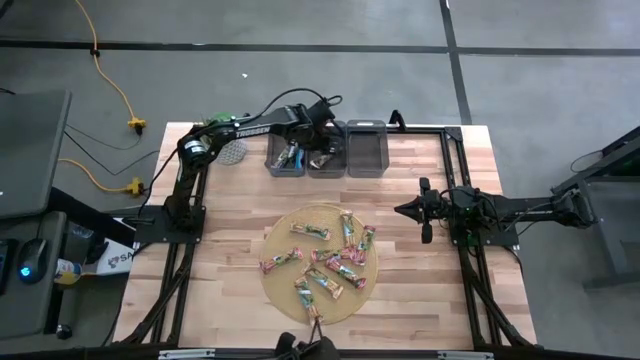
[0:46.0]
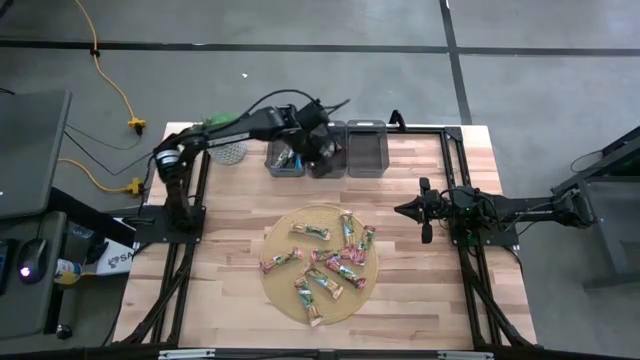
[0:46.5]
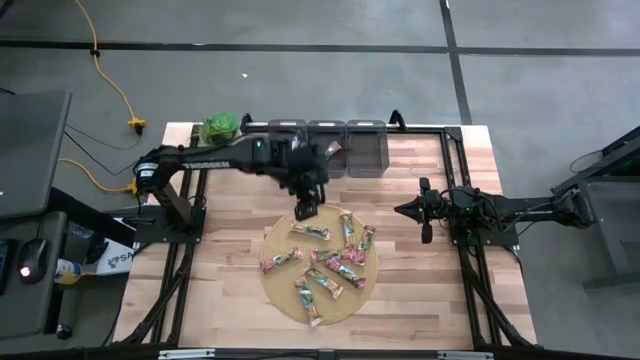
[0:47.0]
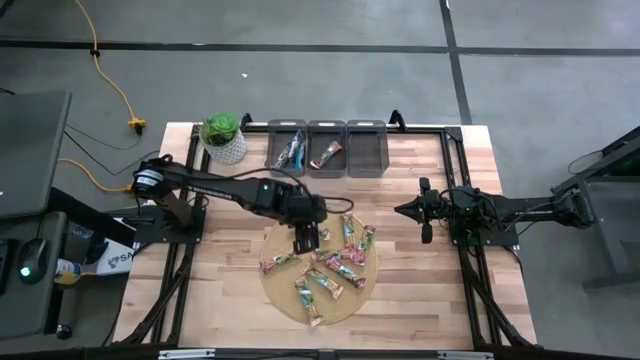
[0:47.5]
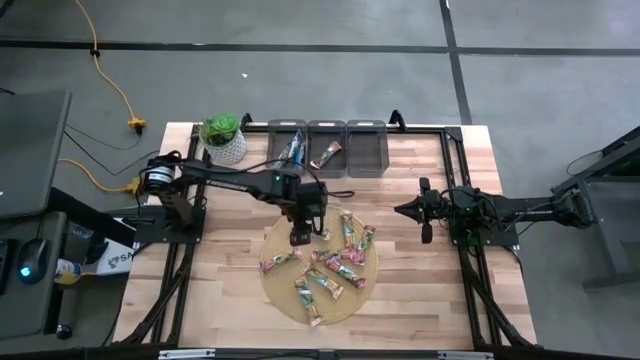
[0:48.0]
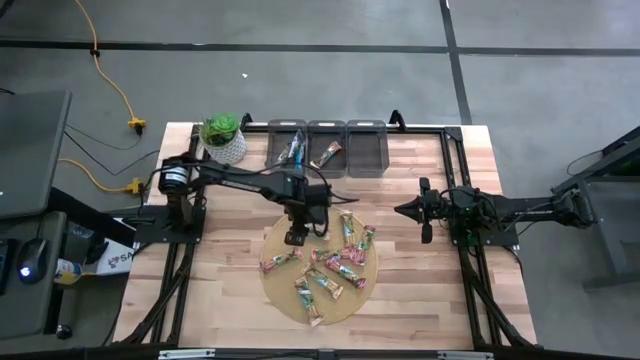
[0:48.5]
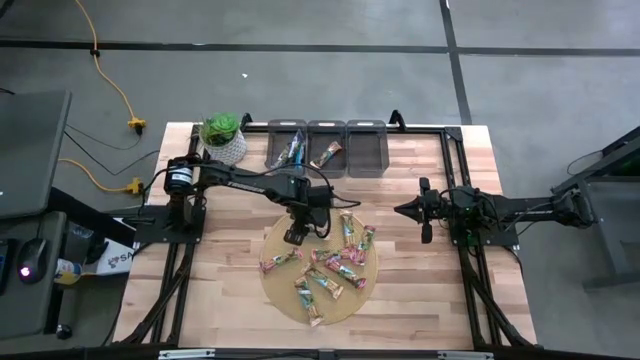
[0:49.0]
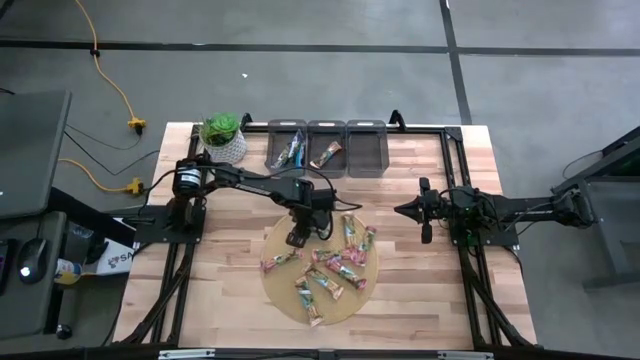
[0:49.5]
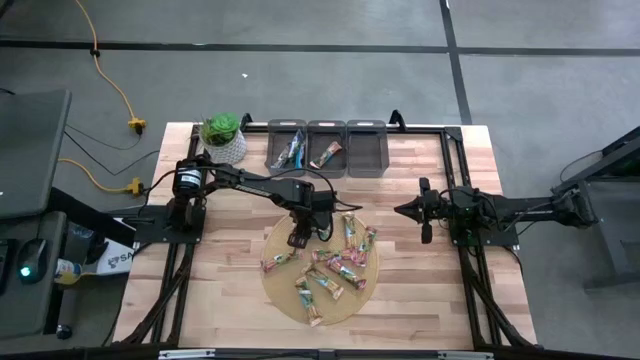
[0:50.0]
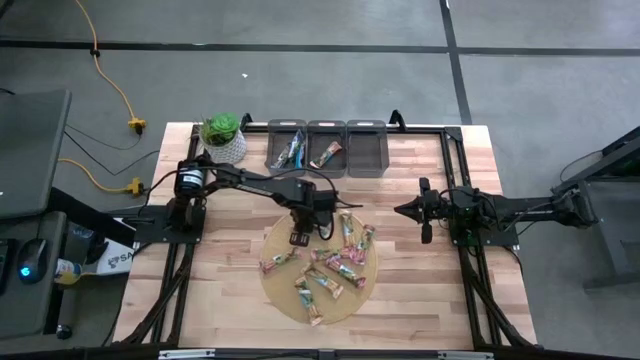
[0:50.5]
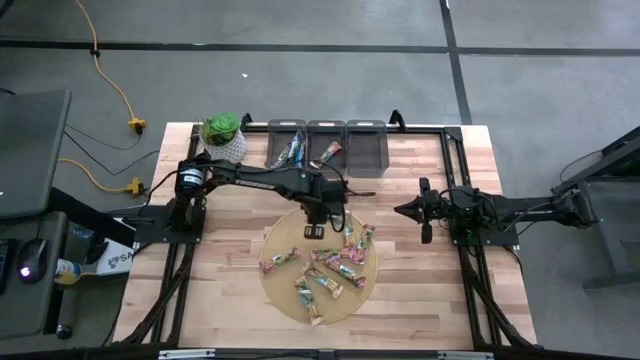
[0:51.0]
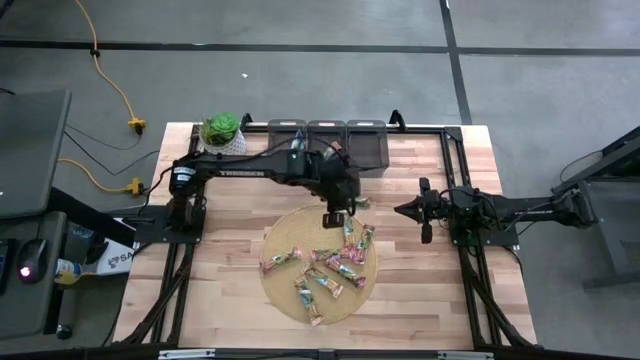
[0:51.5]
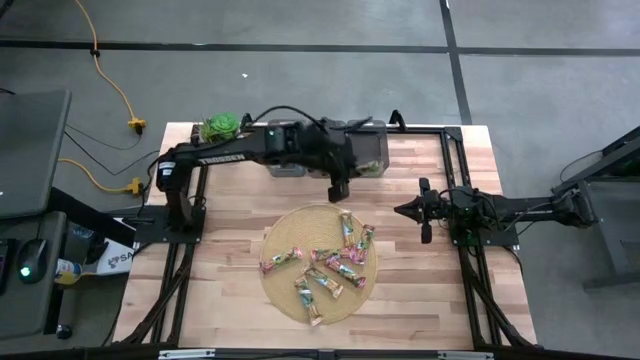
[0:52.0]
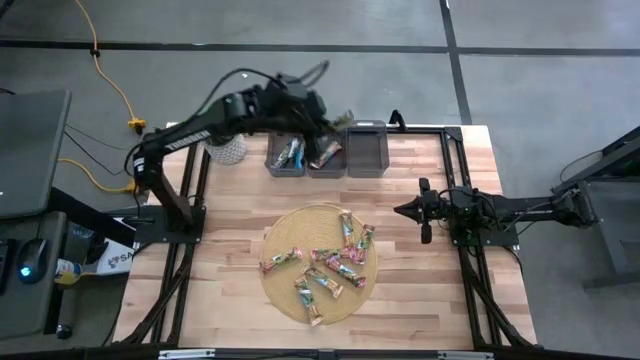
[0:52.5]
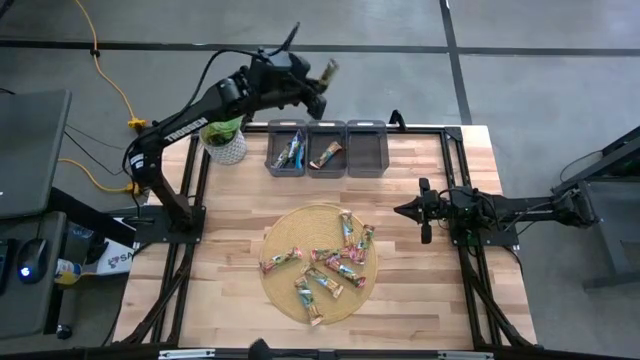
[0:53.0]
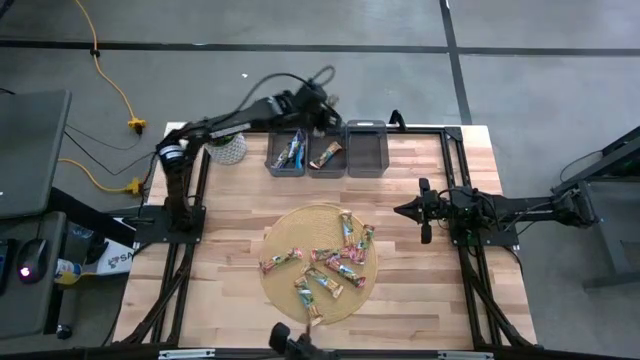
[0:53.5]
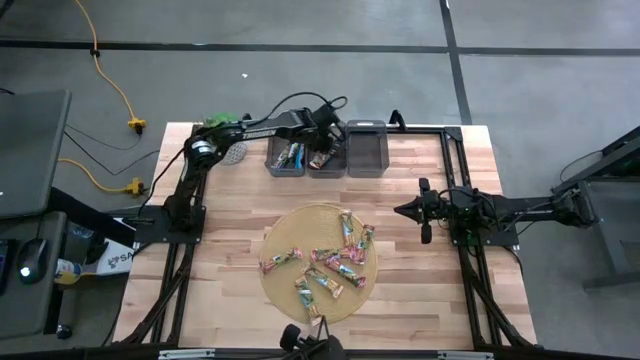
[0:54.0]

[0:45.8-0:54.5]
Task: Pick and place Granola Bars by type
Put the yellow granola bar into the middle black bin

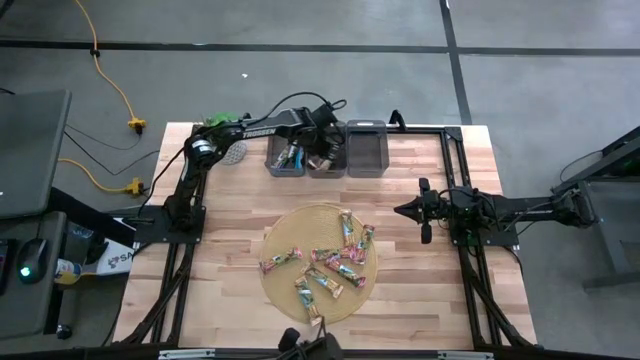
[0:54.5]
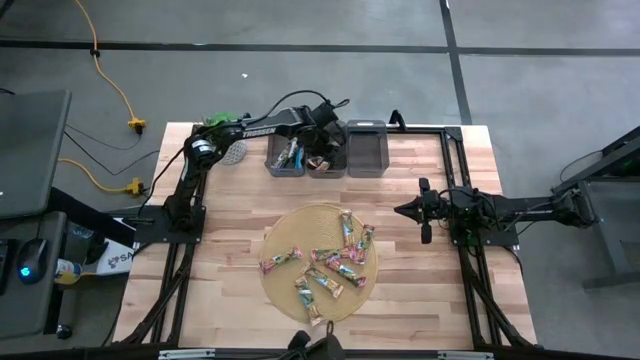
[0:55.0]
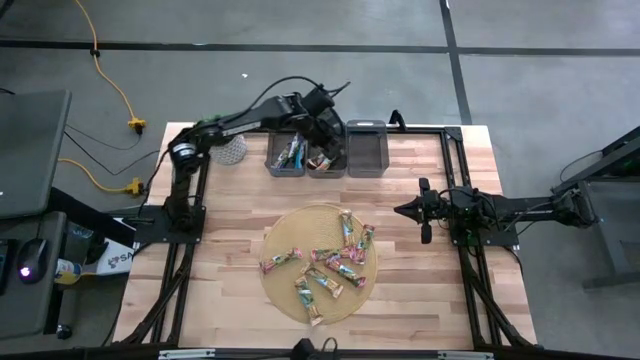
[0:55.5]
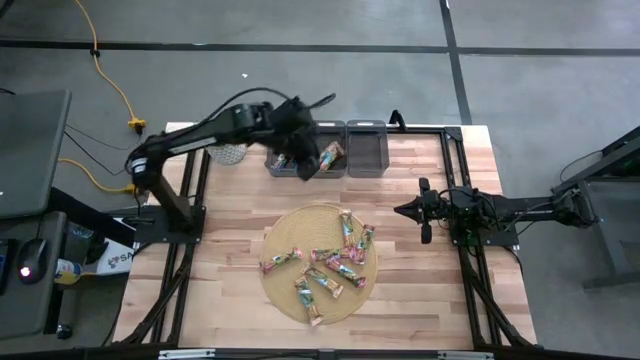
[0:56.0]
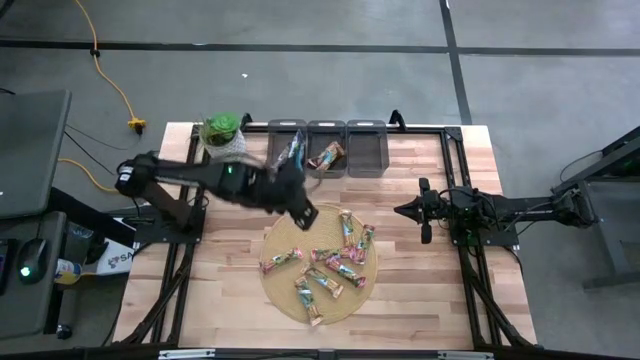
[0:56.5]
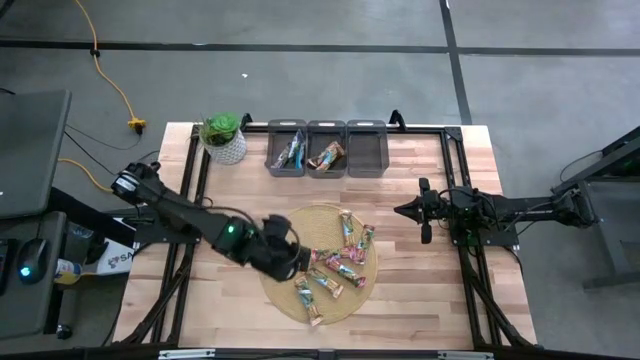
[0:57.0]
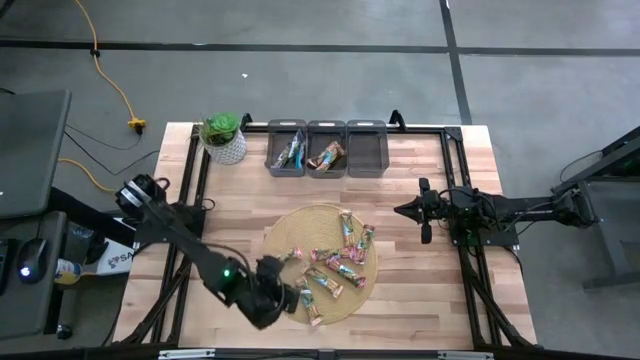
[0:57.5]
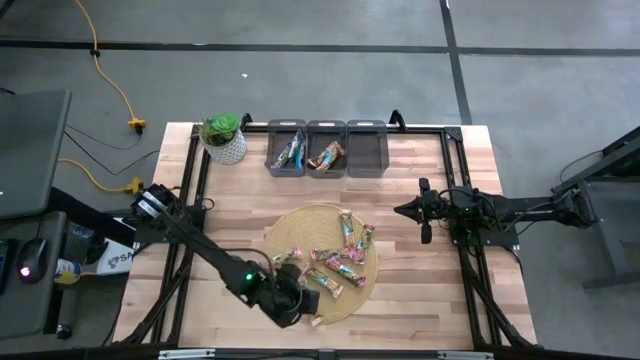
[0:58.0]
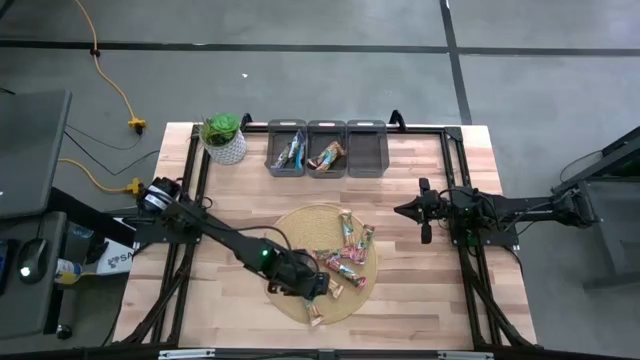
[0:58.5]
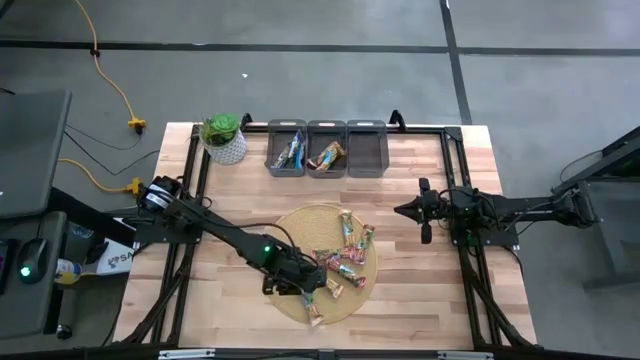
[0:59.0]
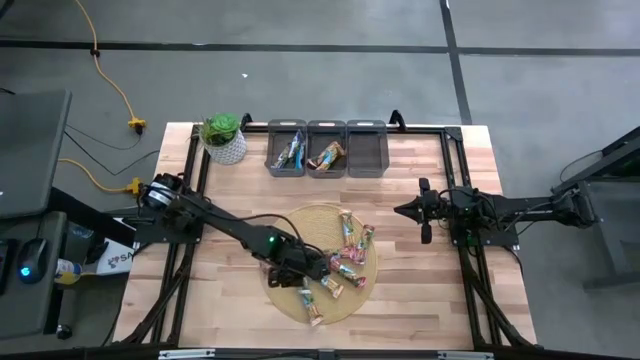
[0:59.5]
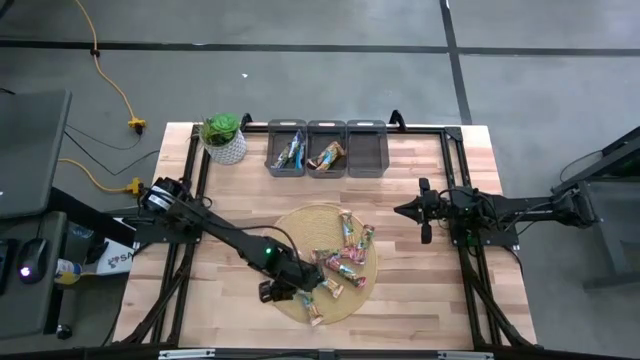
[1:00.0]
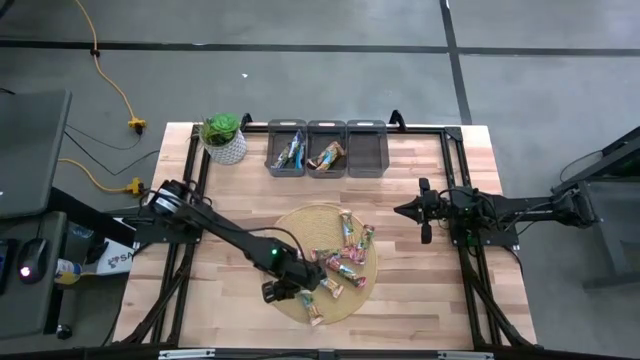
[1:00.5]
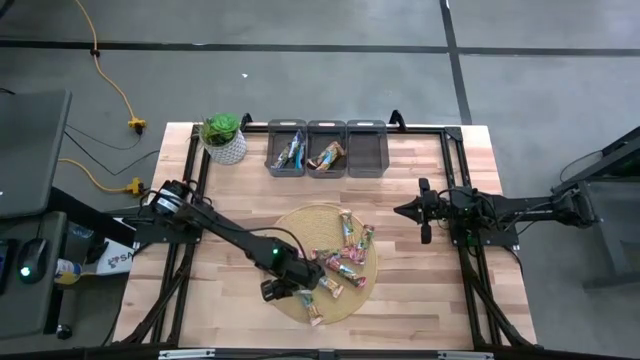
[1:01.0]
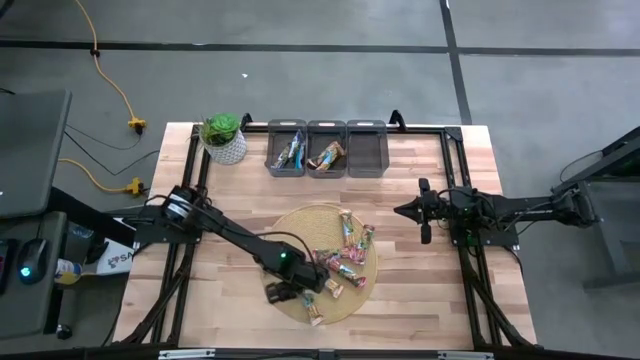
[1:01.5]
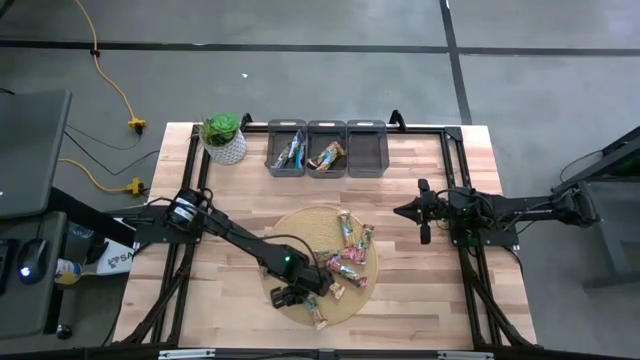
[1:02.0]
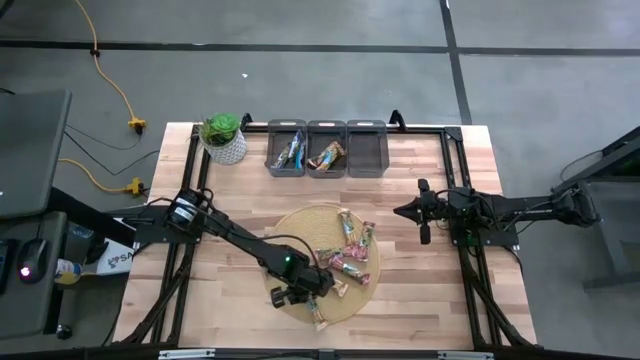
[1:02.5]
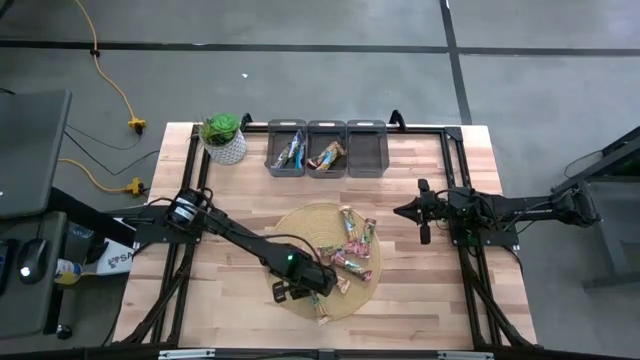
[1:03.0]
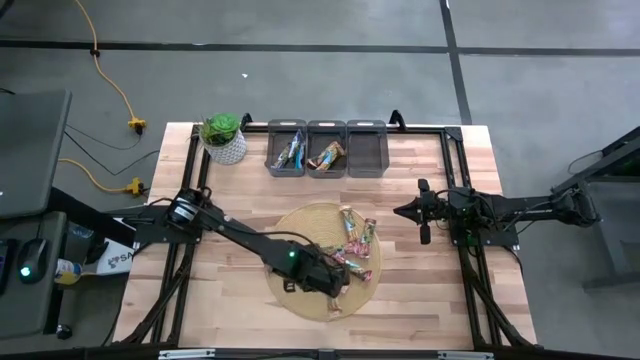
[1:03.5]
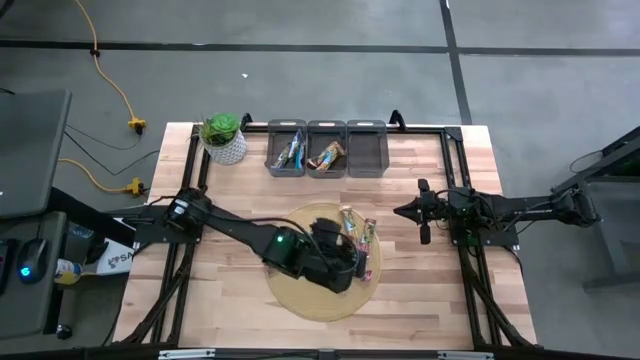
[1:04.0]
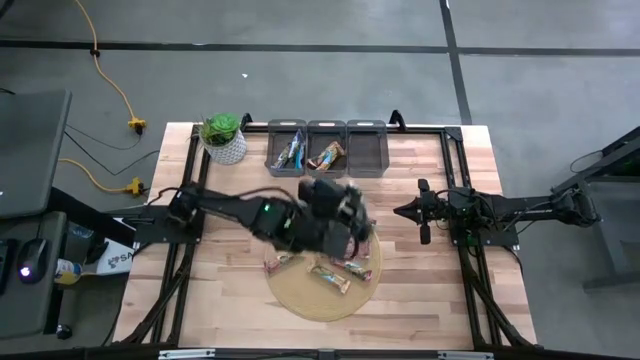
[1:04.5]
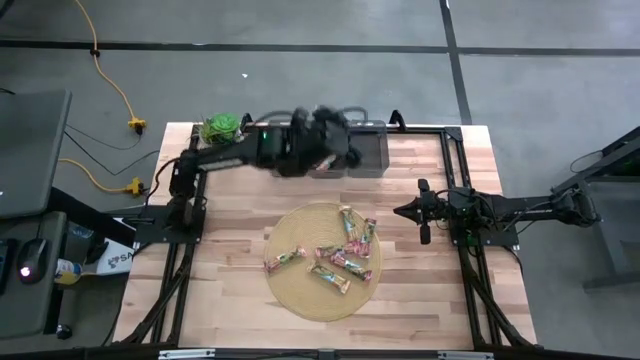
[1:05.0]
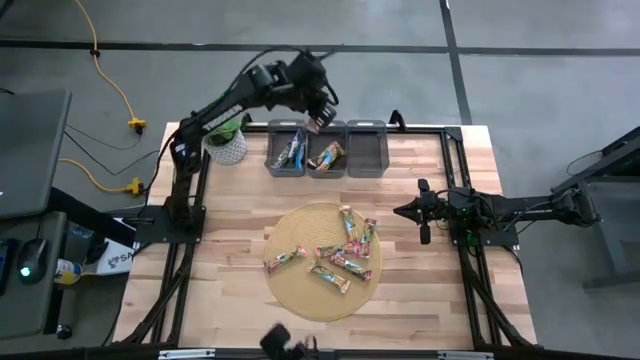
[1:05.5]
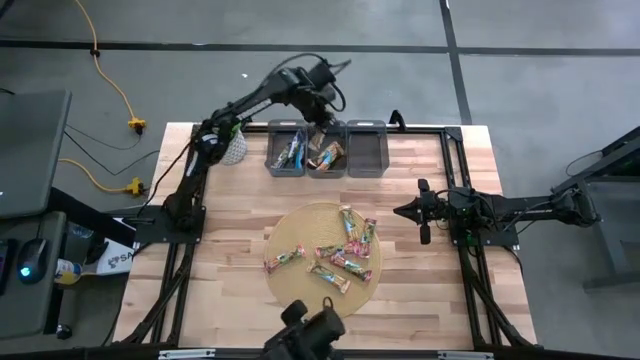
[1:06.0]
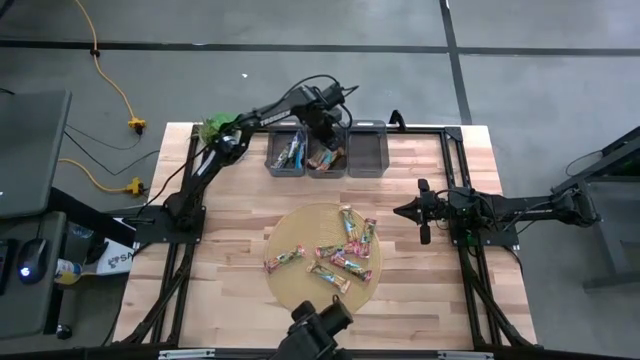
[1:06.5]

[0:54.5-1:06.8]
Put the yellow granola bar into the middle black bin
